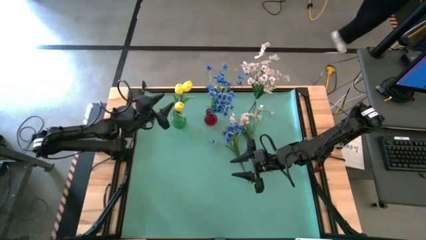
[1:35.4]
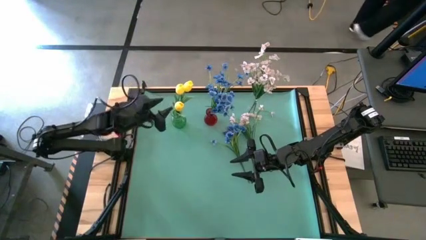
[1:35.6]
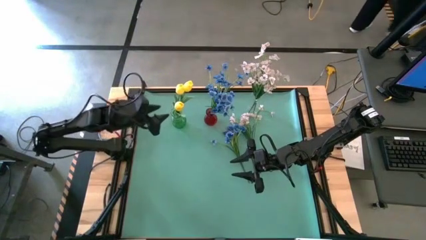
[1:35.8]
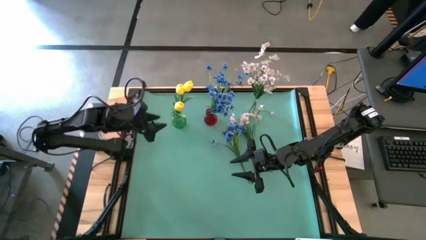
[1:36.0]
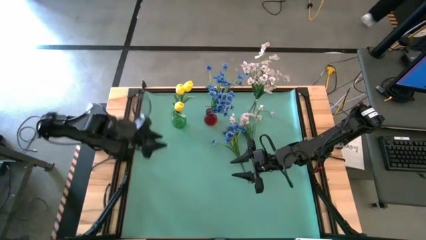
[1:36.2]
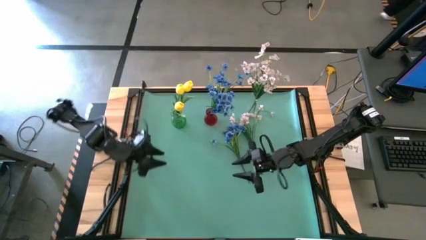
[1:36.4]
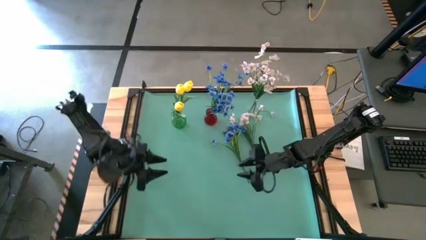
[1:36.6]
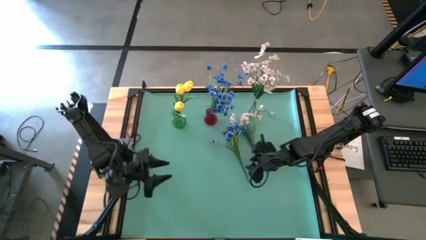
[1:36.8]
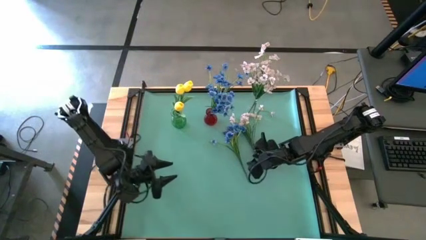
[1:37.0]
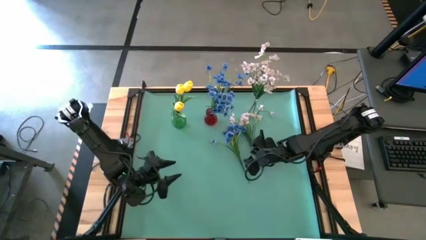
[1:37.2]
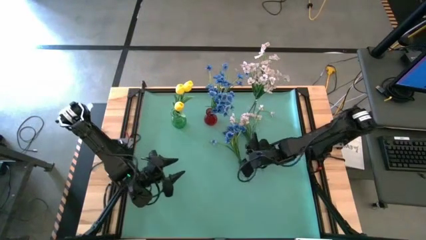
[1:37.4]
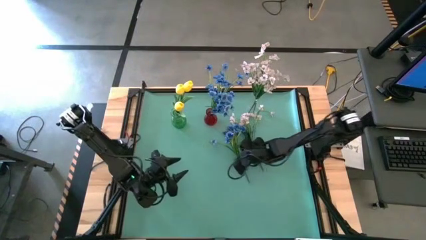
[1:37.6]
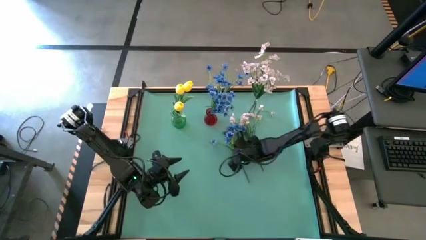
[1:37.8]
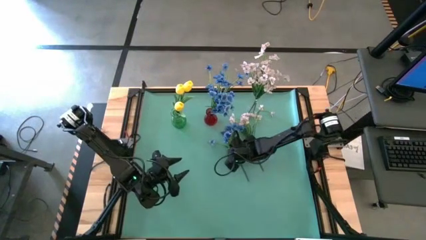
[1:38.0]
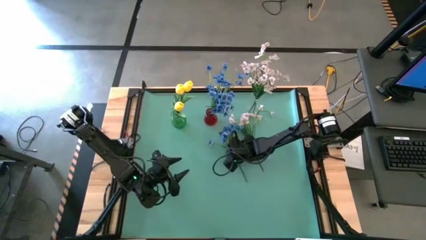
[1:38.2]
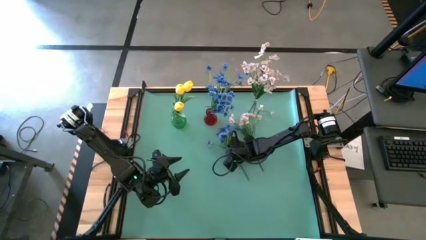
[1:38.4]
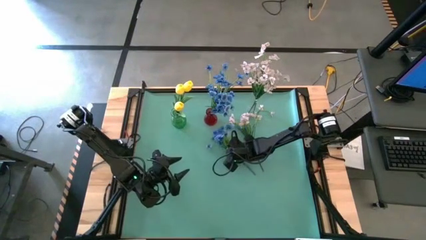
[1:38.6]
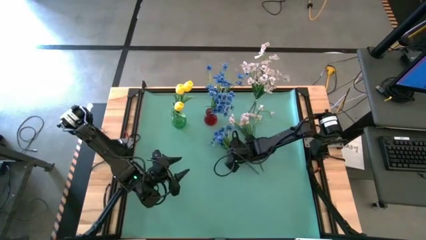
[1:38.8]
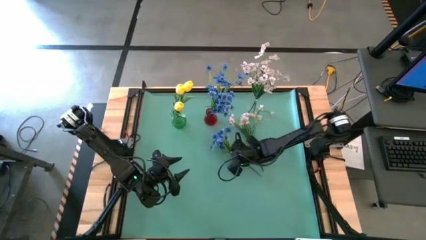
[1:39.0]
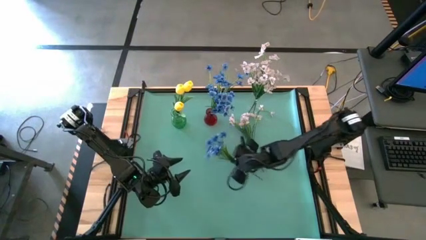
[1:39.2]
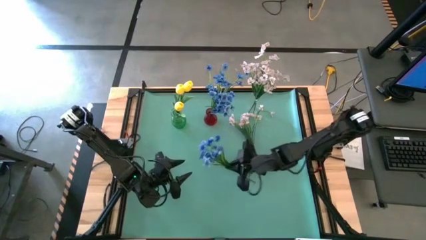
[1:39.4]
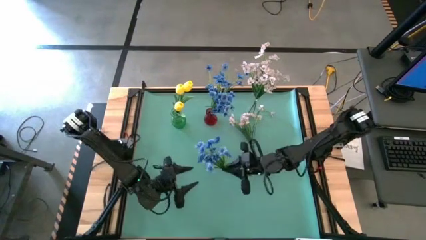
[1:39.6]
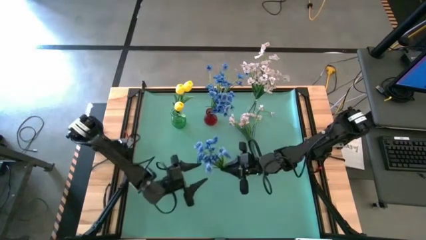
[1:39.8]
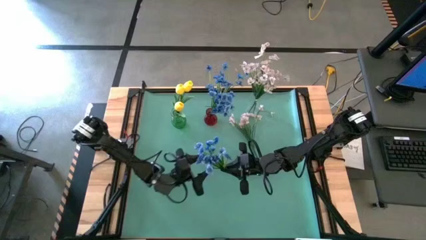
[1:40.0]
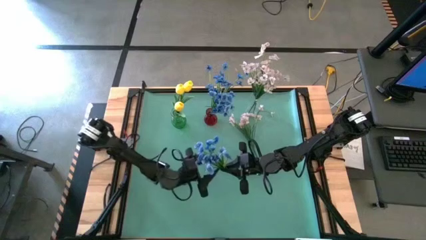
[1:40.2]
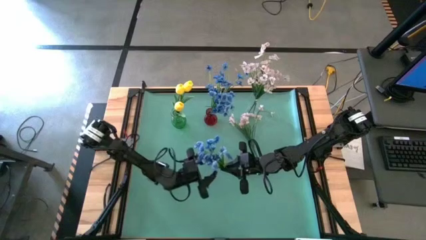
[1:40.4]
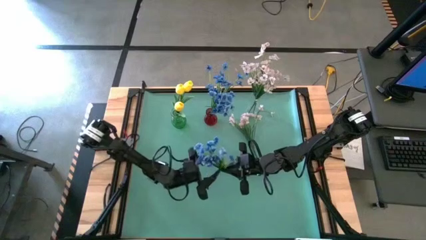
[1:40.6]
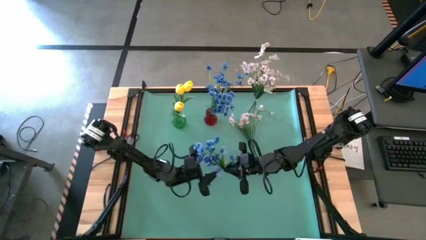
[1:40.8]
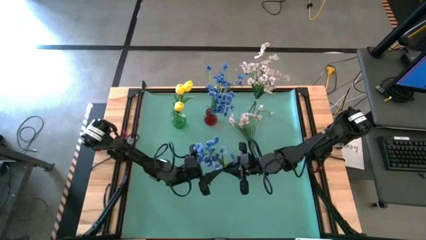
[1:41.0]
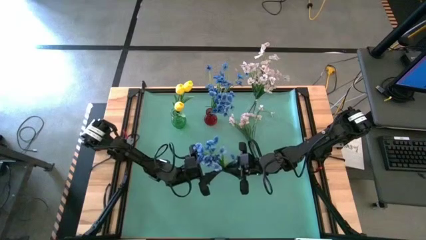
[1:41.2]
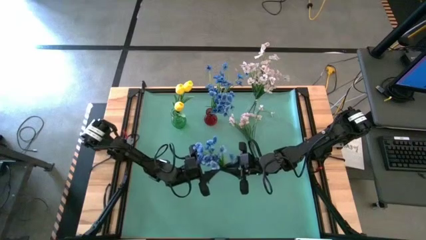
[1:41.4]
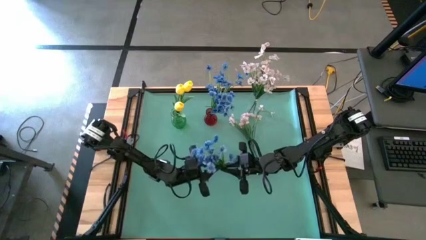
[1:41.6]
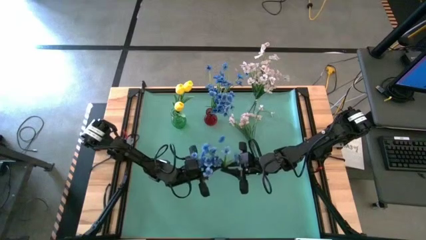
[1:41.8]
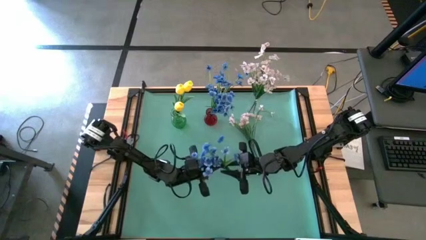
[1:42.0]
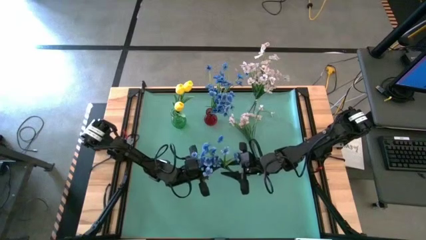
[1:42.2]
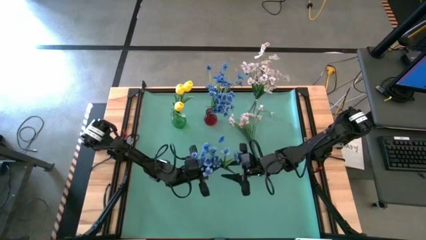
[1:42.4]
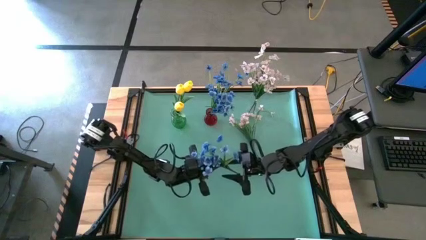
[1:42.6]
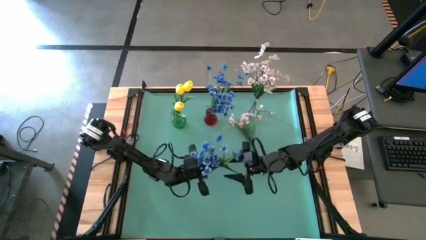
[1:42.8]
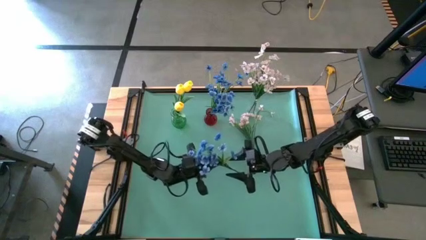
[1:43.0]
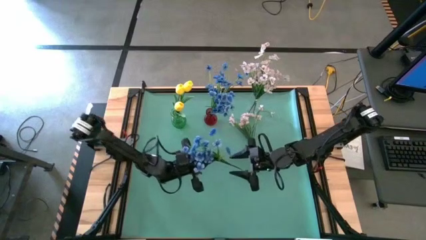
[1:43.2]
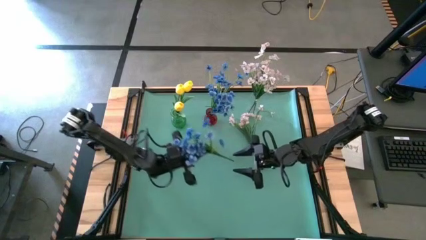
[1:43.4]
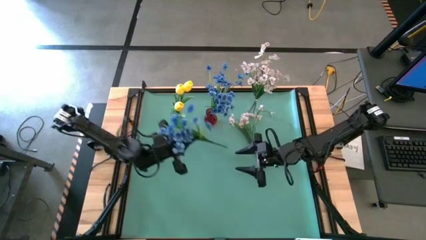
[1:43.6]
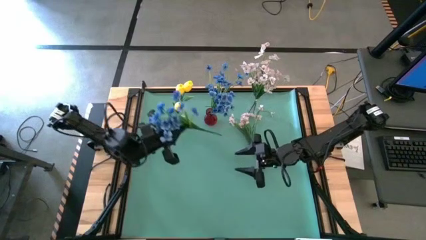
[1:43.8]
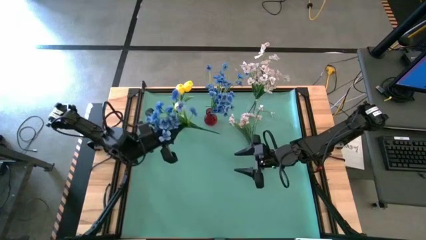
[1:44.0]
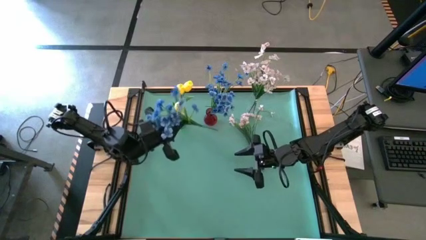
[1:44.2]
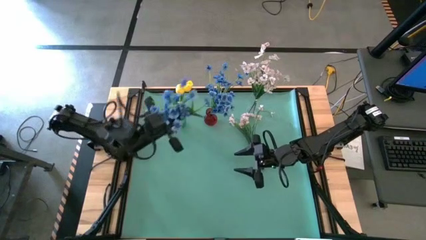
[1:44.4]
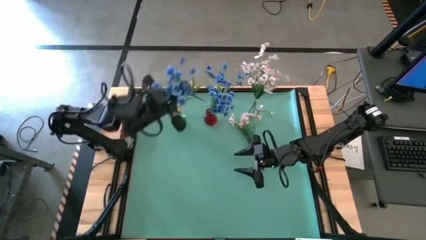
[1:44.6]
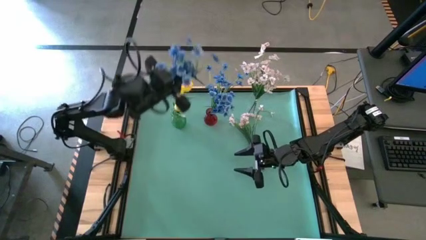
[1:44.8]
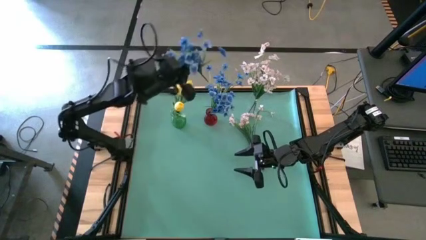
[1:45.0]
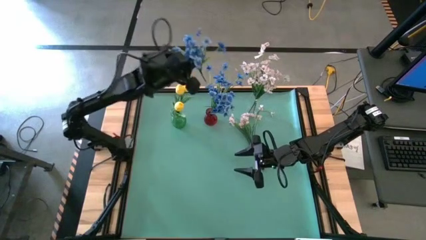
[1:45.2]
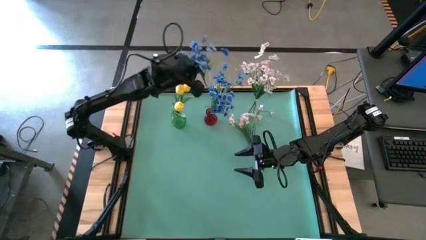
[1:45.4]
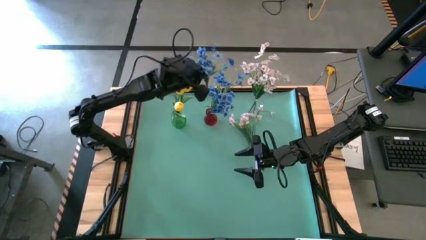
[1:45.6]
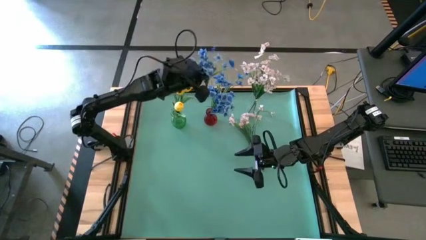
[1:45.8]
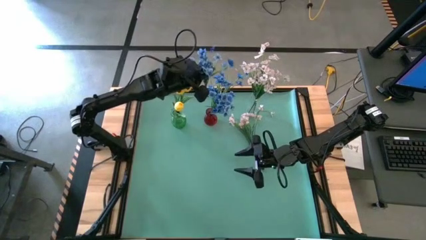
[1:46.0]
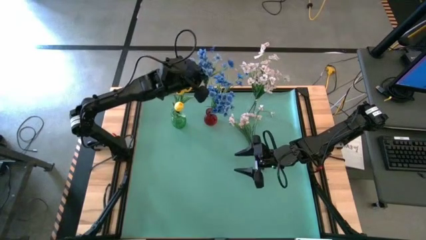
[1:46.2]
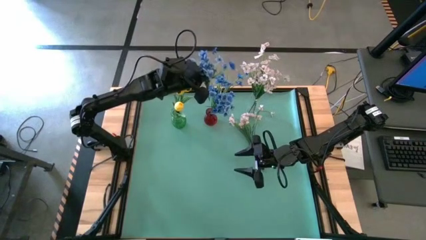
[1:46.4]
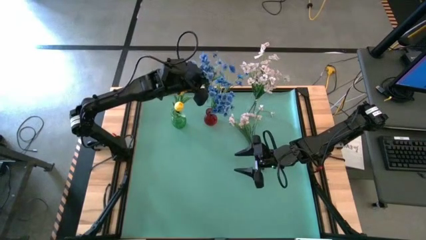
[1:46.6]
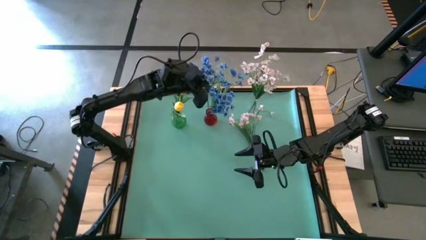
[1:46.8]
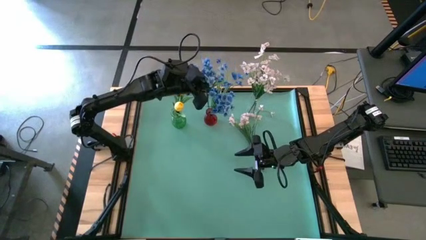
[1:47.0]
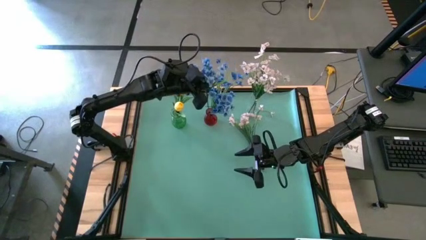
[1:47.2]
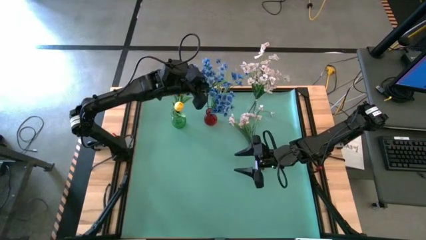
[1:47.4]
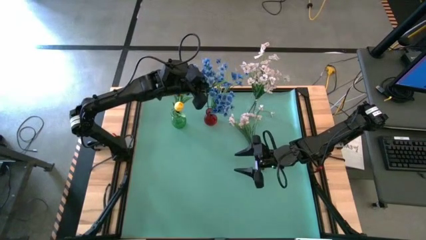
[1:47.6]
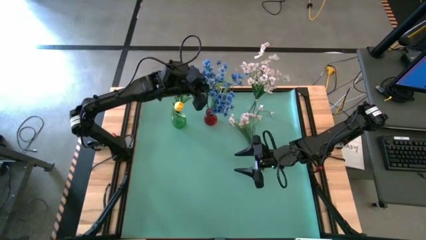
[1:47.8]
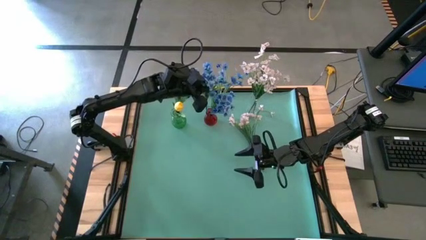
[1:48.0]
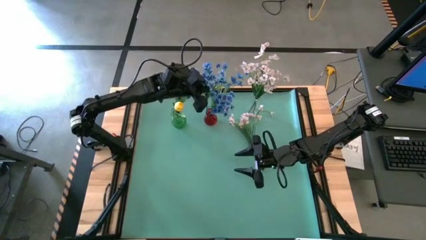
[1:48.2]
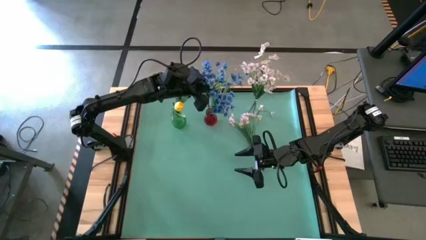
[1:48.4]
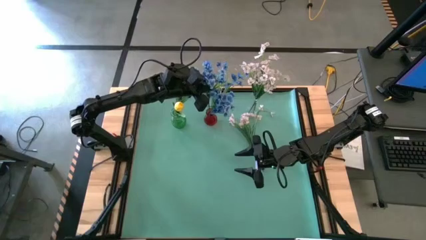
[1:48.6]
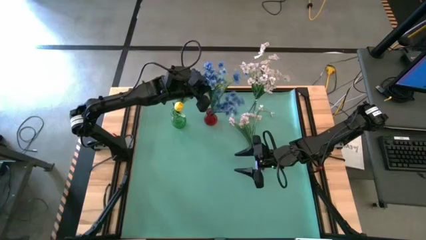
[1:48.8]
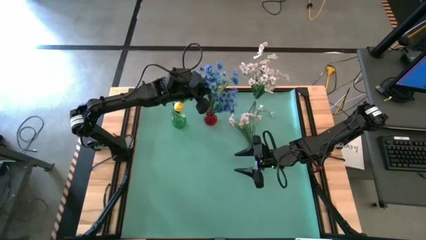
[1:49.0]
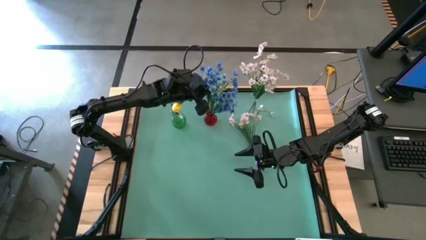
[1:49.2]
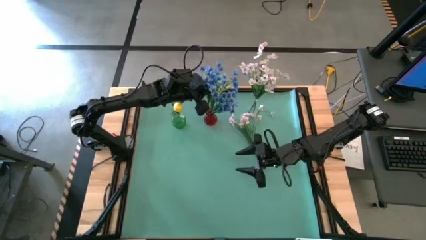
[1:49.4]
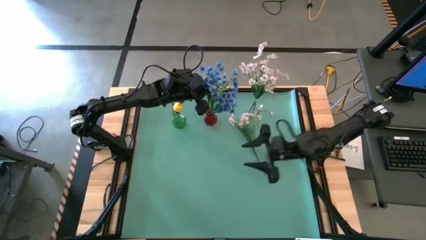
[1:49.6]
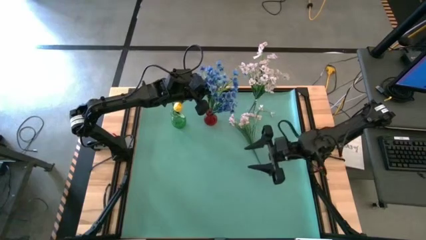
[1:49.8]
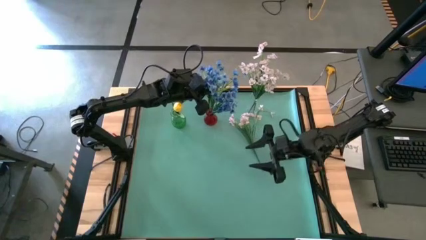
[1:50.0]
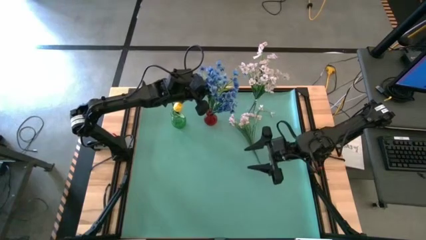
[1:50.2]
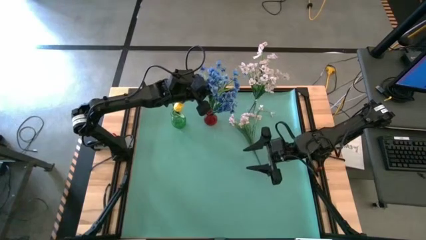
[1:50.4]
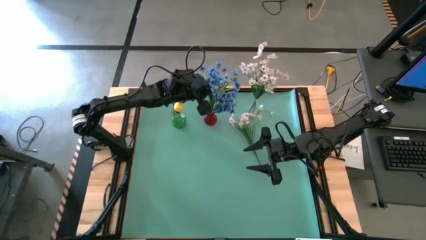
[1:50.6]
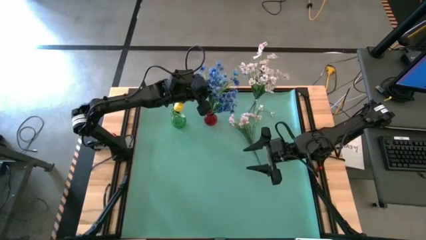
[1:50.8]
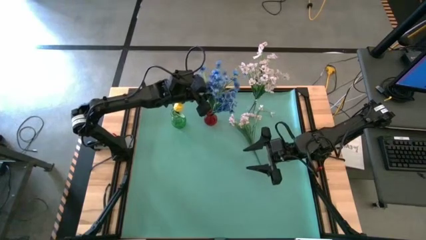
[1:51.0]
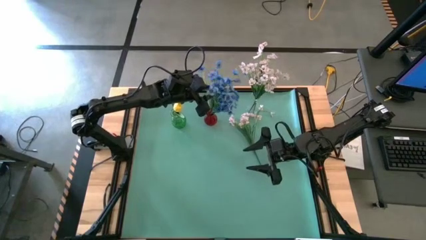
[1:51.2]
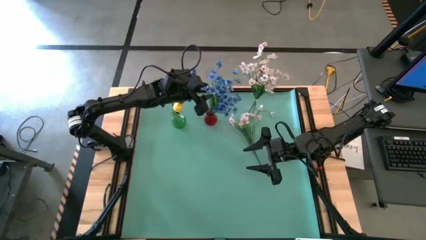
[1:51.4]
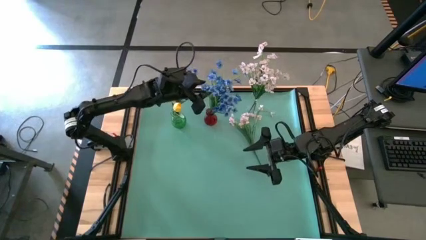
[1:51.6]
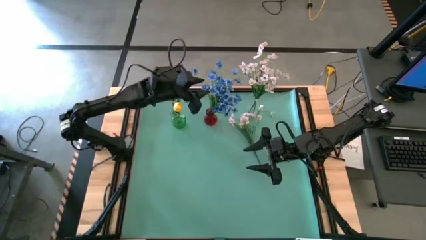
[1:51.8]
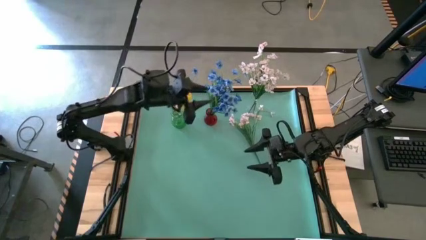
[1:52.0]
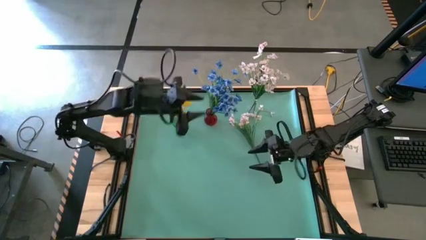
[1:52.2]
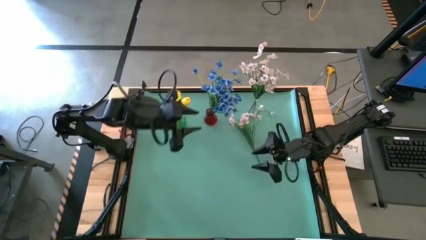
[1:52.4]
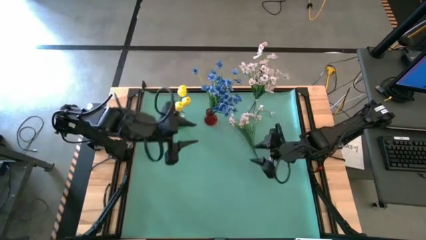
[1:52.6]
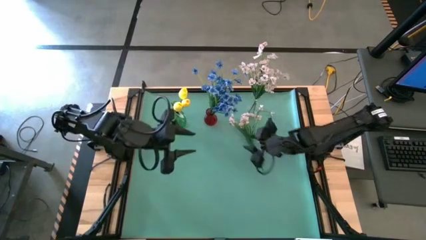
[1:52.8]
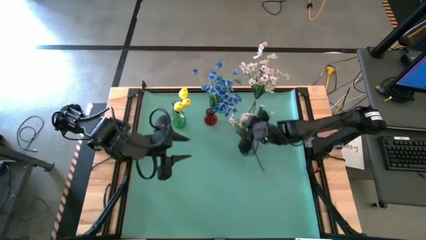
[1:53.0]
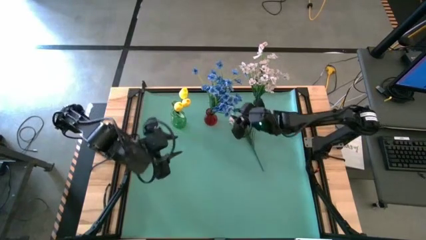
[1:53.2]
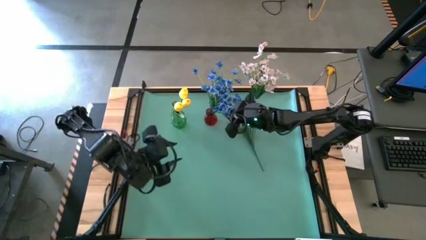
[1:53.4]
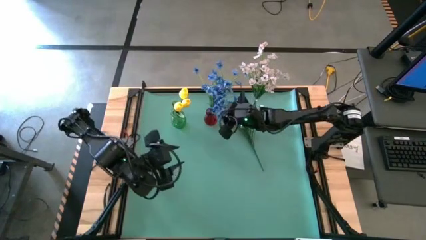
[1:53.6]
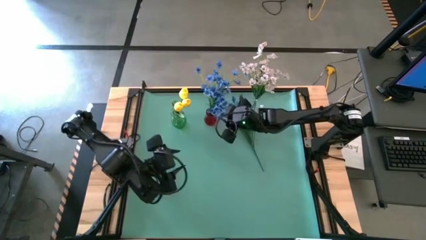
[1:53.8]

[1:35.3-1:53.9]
Task: Sort flowers into vase by color
Put the blue flower into the red vase
